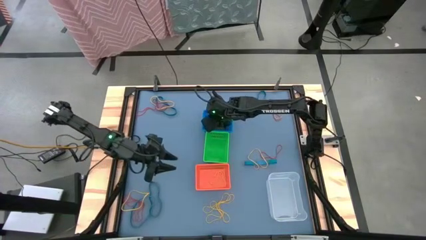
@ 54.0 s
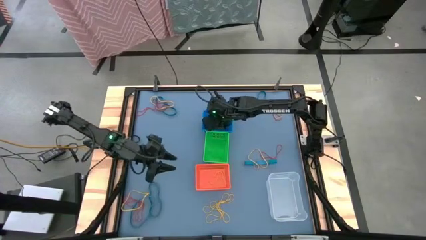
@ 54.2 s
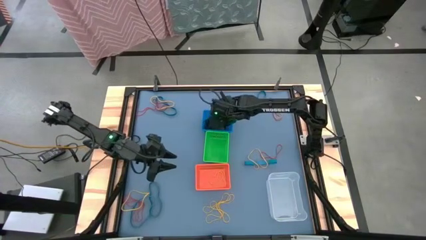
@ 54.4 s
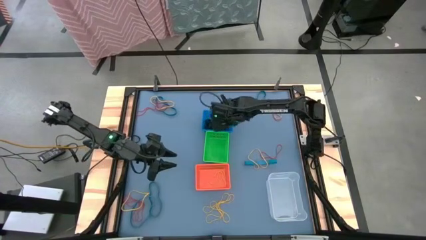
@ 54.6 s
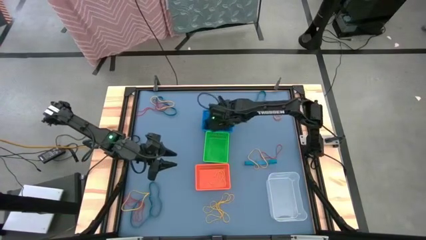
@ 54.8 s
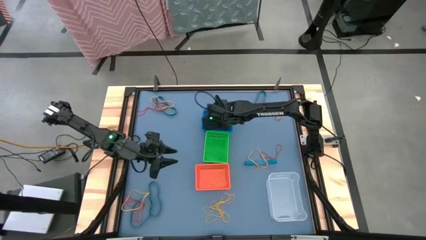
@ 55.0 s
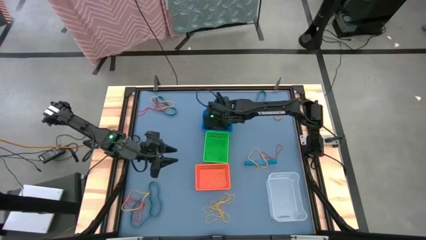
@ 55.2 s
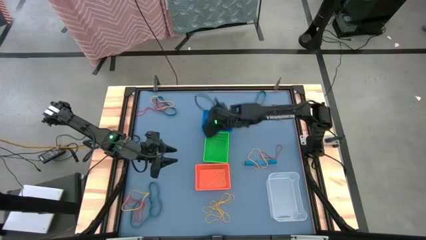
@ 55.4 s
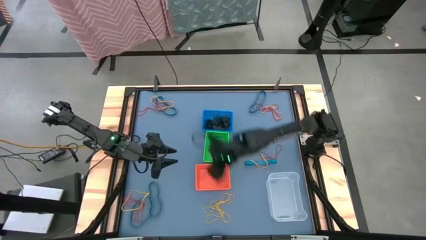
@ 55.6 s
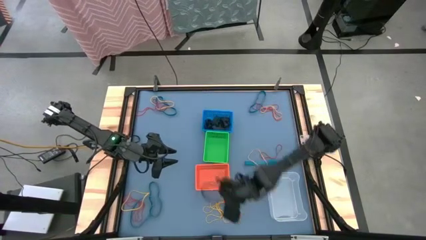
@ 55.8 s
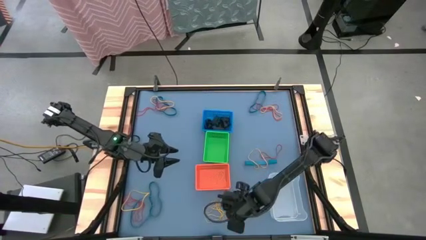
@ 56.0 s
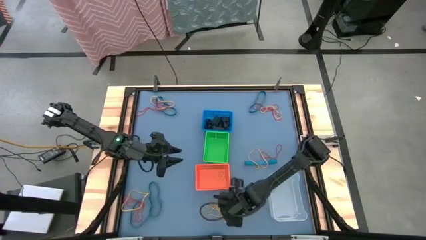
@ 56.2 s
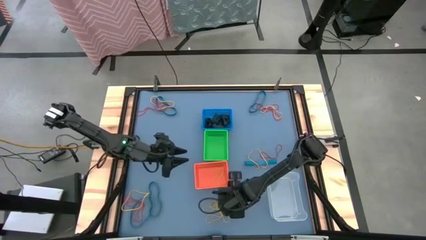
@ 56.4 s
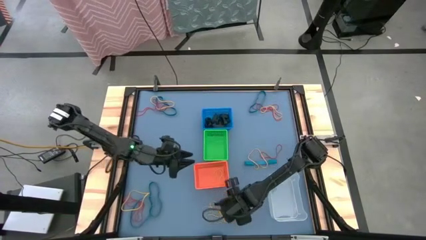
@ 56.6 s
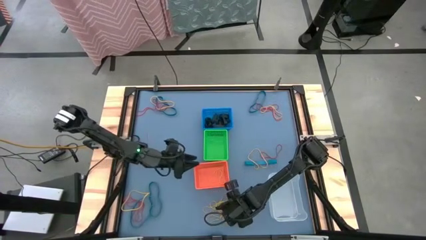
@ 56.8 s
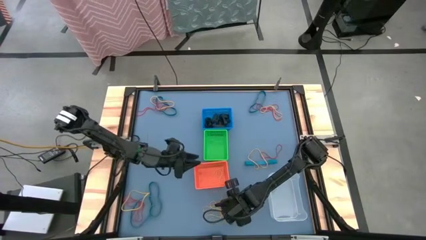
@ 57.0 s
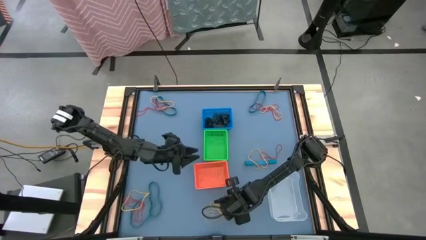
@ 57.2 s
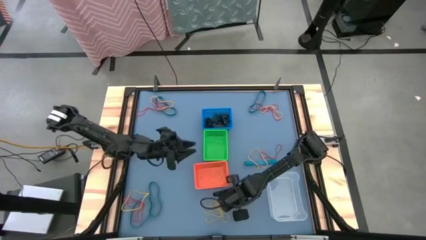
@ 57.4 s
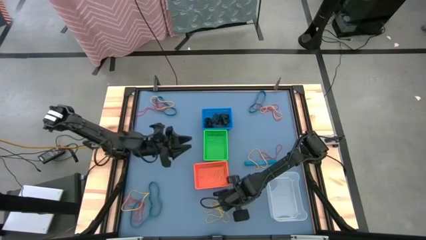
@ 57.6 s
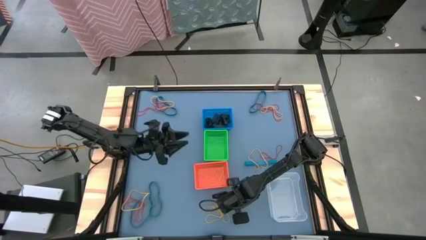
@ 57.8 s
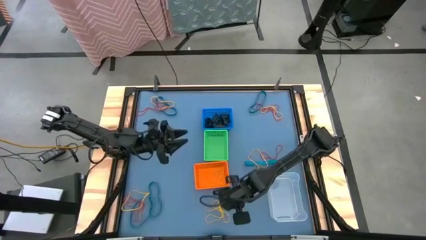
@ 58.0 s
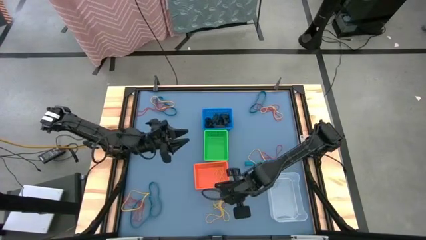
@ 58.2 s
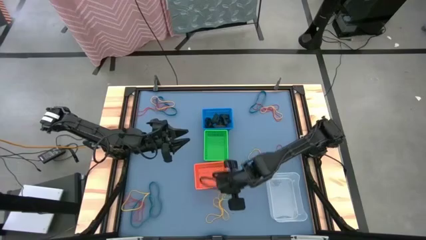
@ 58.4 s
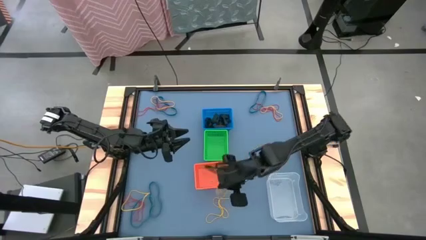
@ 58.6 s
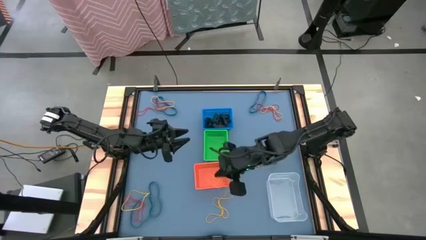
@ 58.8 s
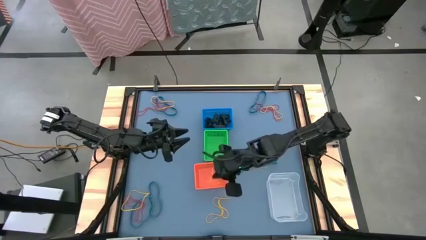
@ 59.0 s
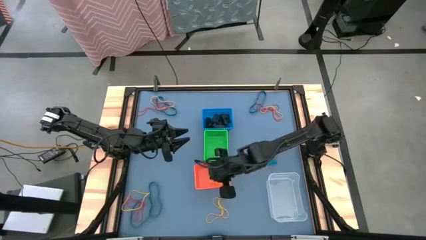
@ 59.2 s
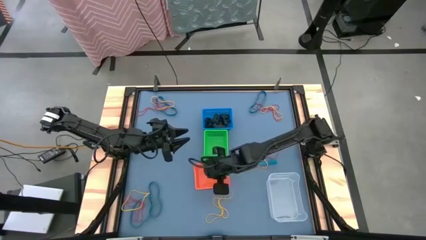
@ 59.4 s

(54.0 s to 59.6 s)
Task: Sort rubber bands into baskets
Put the yellow rubber band into the orange bin

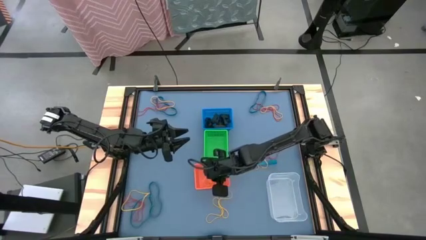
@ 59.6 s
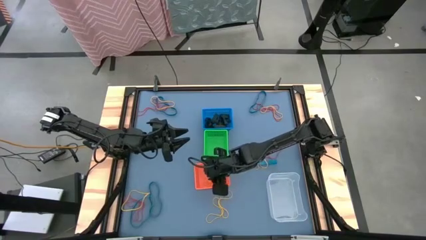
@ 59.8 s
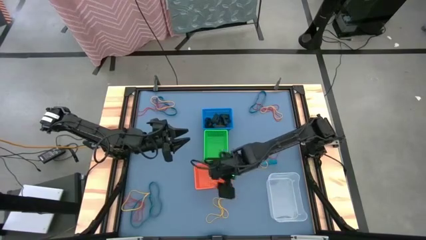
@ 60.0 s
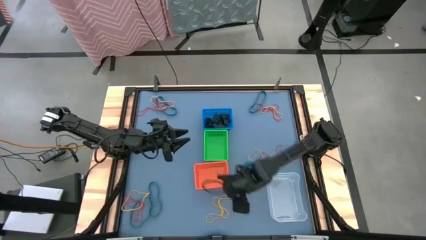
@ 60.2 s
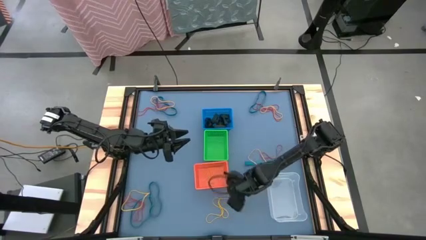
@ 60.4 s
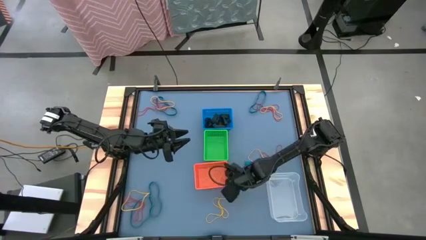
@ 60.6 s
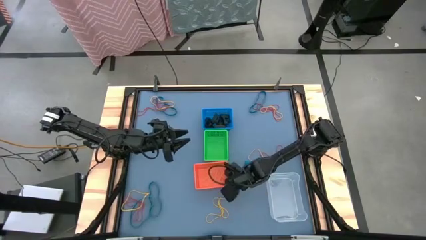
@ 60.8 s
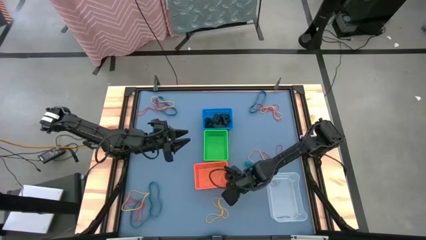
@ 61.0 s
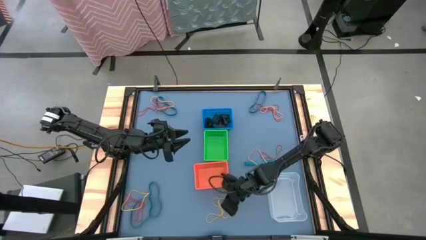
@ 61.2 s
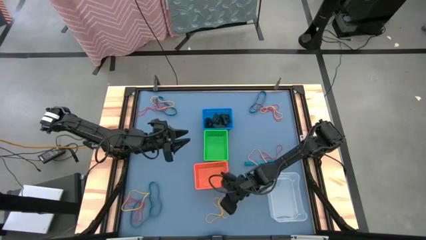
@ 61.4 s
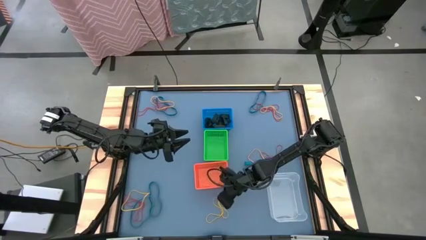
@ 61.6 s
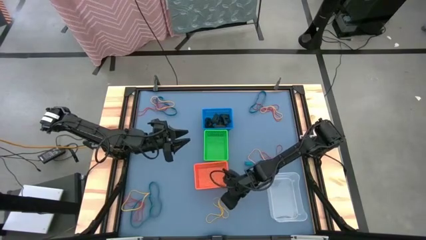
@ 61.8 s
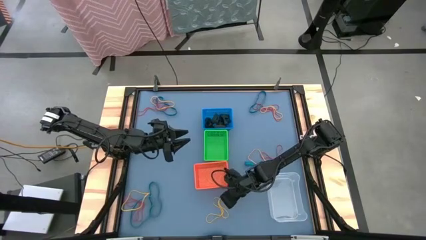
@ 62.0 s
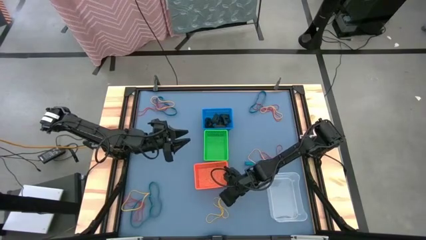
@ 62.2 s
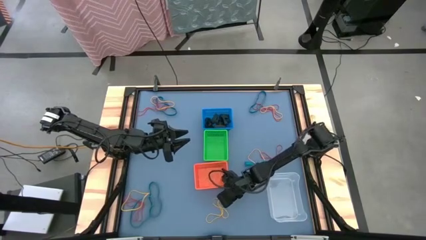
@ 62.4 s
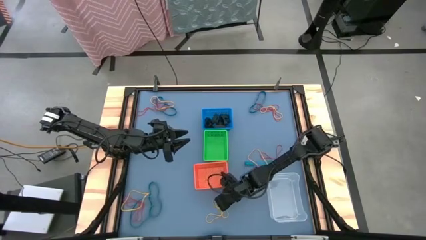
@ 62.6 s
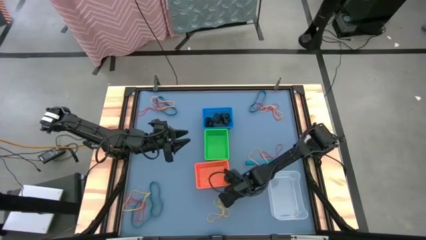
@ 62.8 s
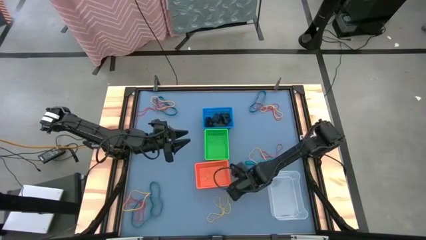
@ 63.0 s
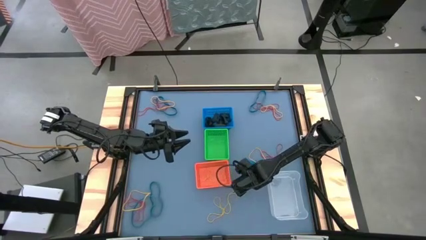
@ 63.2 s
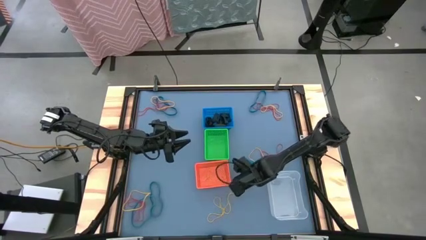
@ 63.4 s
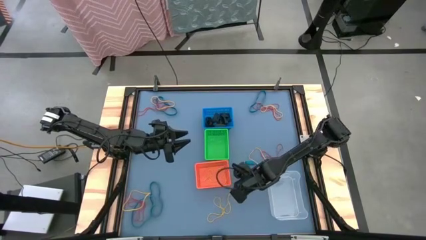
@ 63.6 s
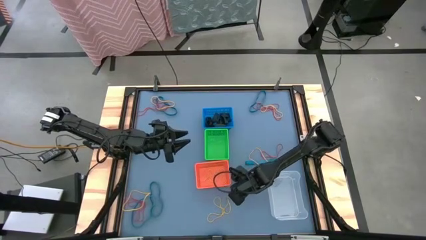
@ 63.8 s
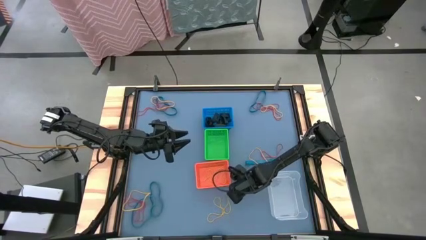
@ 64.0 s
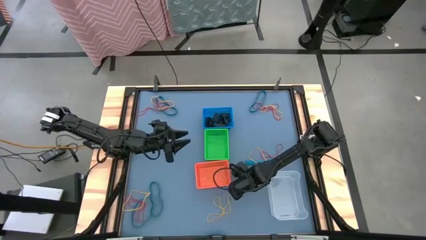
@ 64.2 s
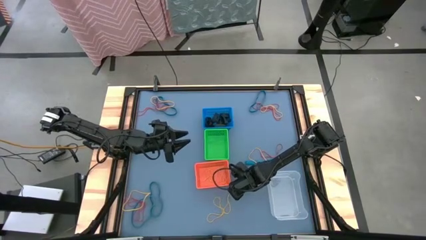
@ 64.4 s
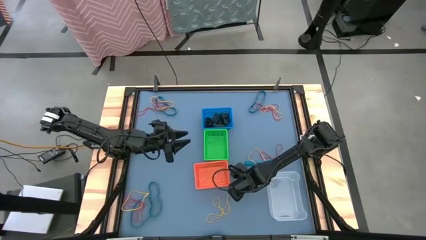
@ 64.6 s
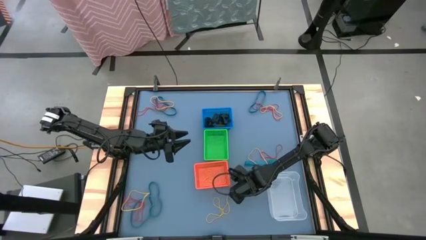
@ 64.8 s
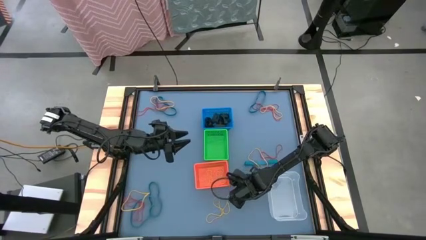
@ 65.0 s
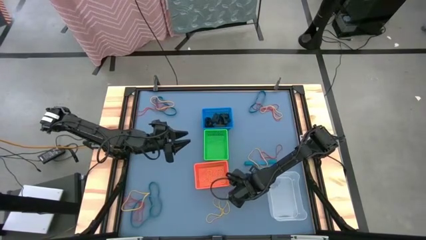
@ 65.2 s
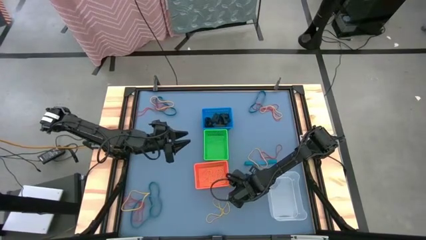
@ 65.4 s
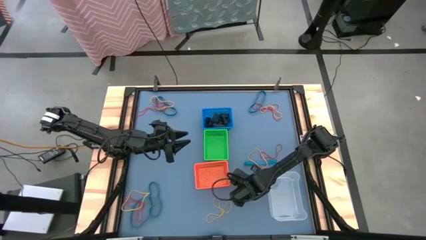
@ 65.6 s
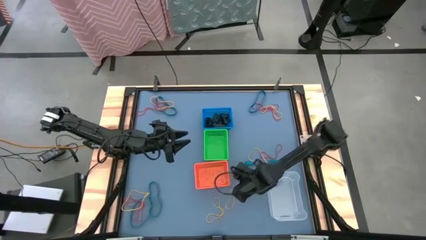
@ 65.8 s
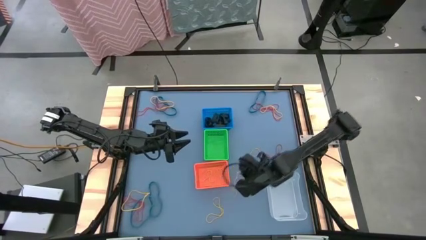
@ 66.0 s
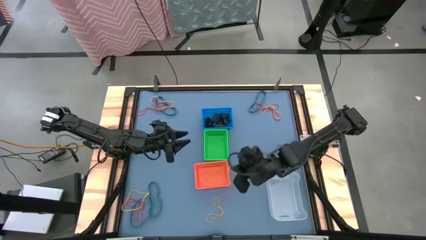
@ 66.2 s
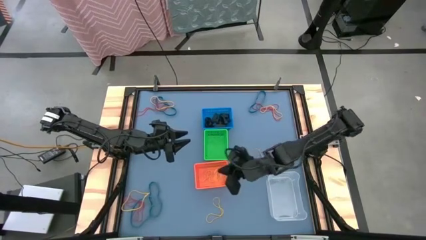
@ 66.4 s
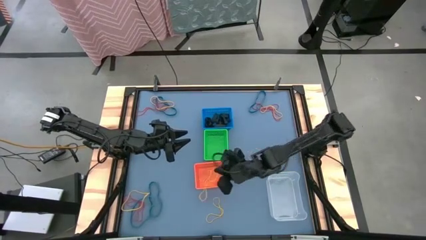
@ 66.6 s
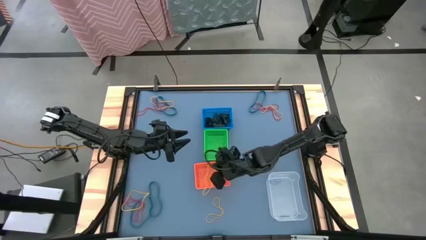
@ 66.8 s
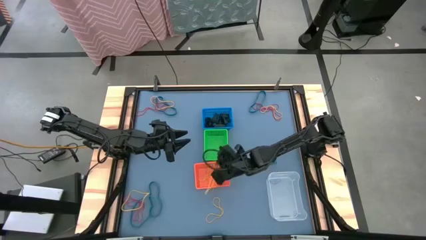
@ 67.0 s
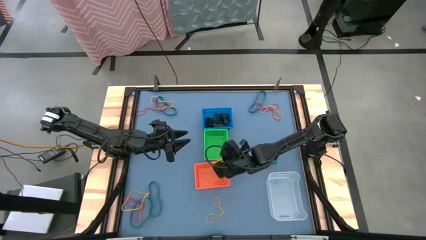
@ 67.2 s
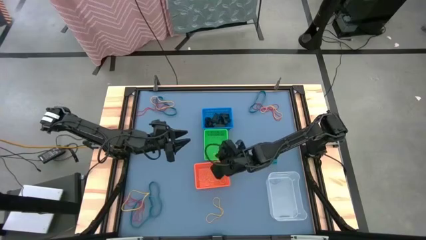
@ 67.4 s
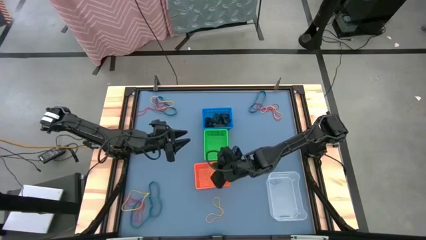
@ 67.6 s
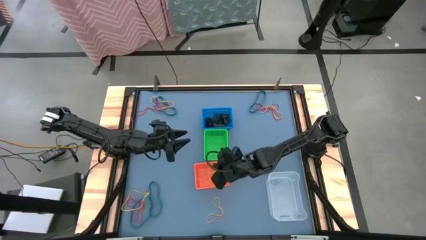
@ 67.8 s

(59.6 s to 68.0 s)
Put the yellow rubber band into the orange bin

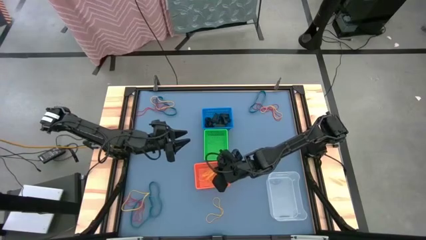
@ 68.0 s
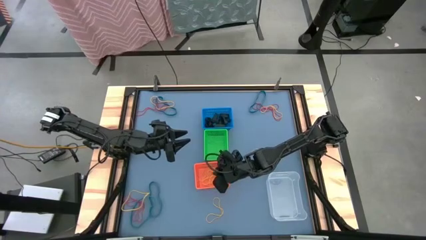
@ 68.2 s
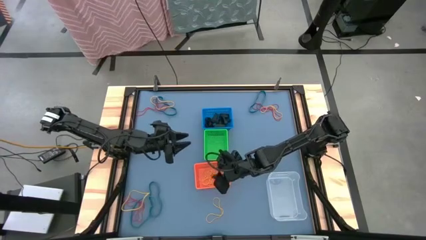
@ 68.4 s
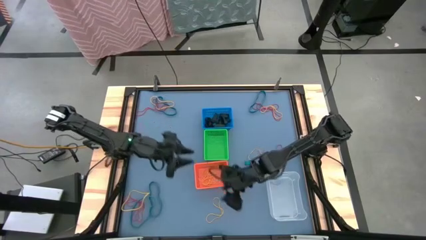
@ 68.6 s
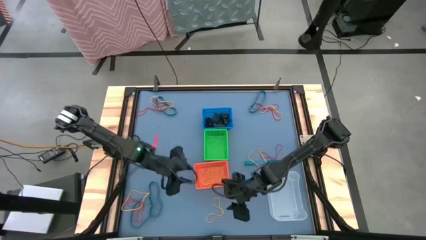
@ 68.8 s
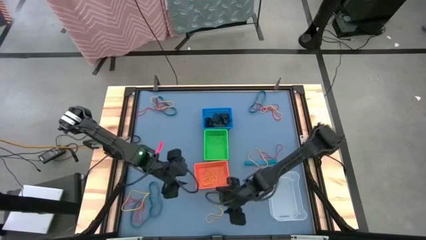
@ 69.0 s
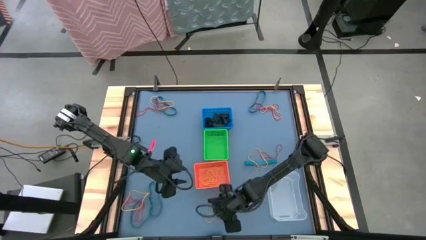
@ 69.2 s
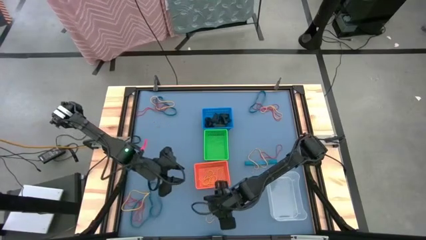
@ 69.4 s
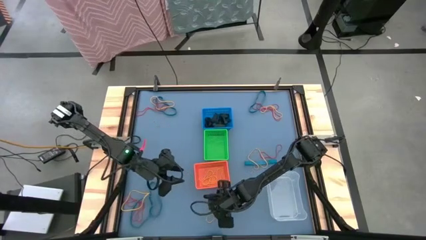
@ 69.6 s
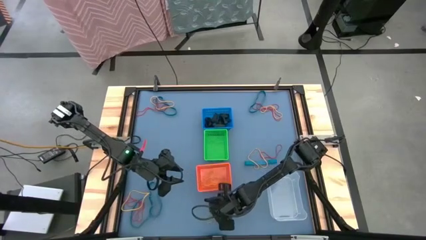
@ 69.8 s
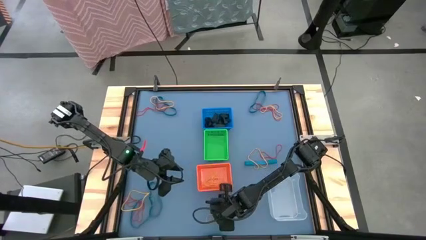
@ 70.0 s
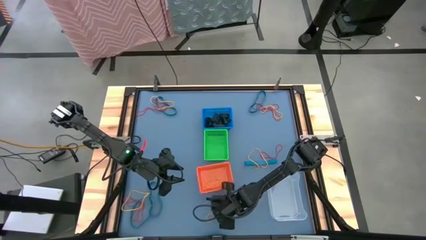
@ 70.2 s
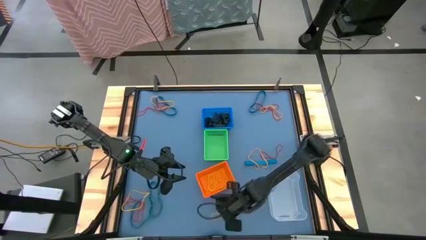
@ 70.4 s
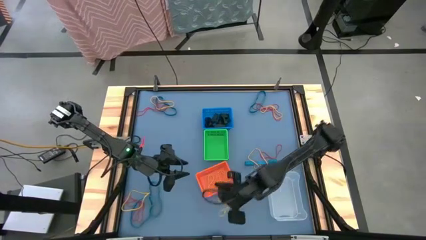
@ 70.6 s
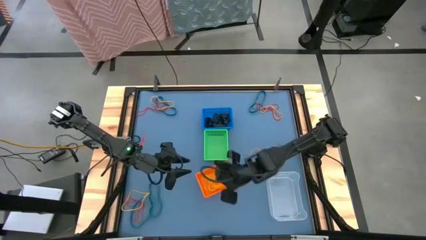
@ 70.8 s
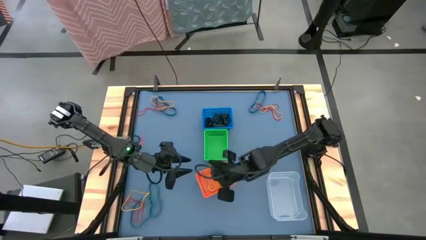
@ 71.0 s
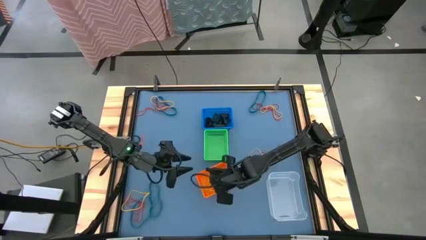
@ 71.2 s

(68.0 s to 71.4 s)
Put the yellow rubber band into the orange bin
